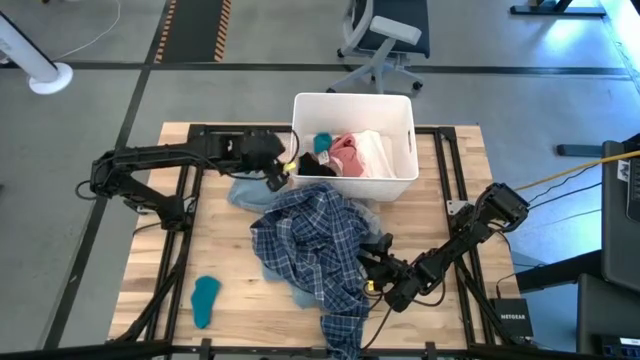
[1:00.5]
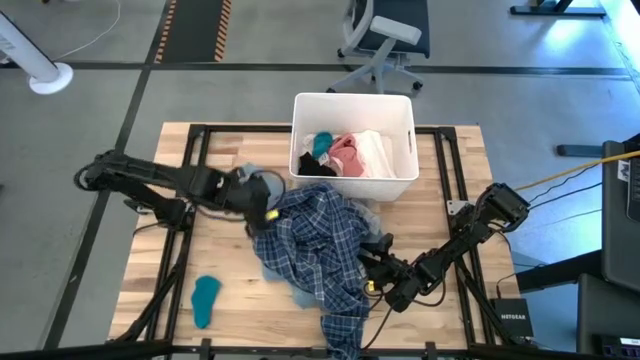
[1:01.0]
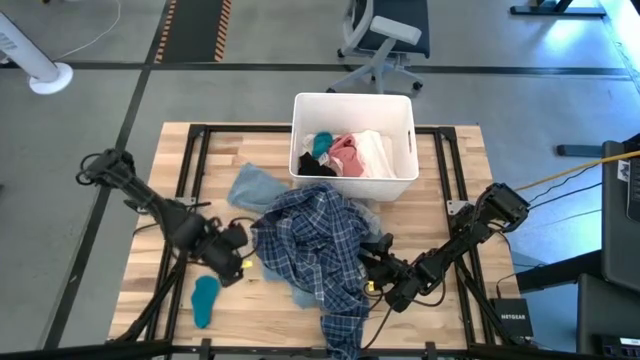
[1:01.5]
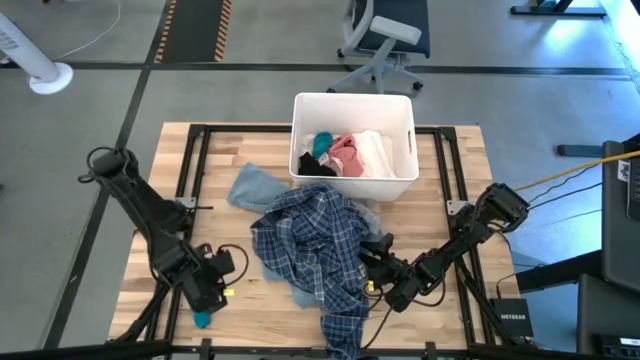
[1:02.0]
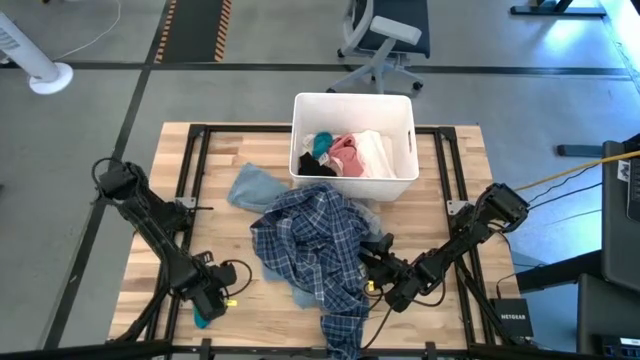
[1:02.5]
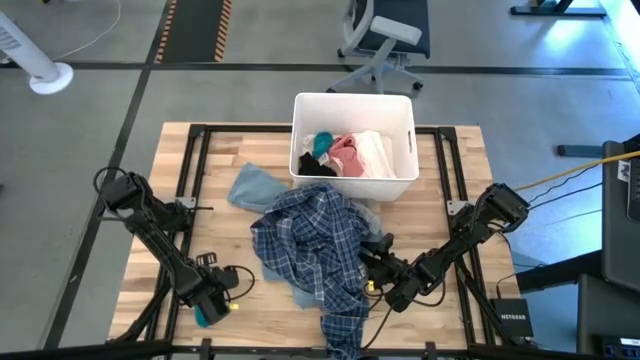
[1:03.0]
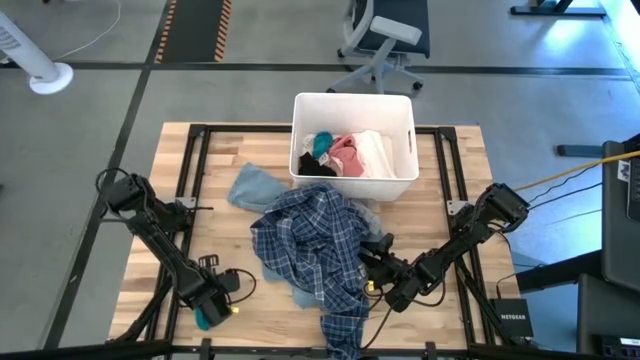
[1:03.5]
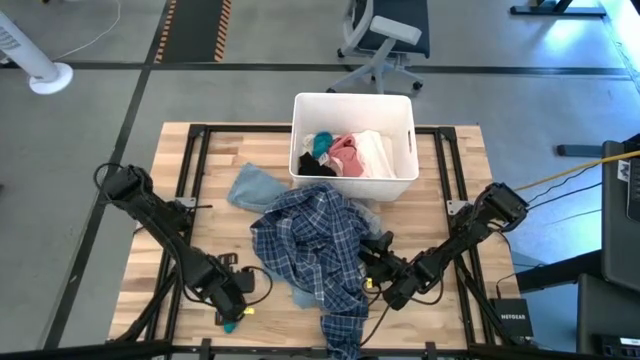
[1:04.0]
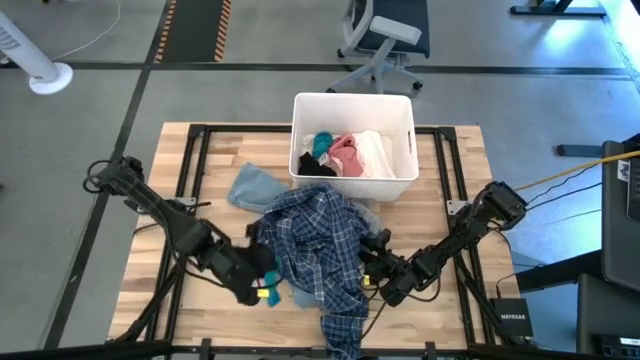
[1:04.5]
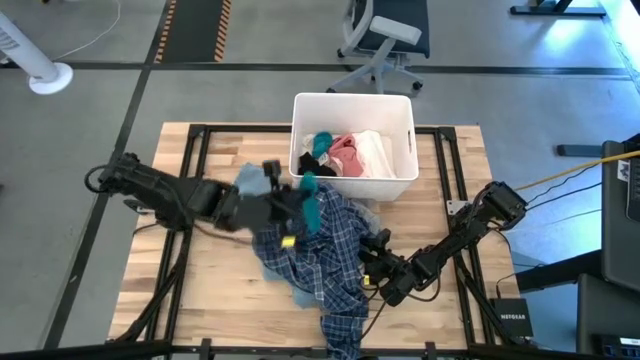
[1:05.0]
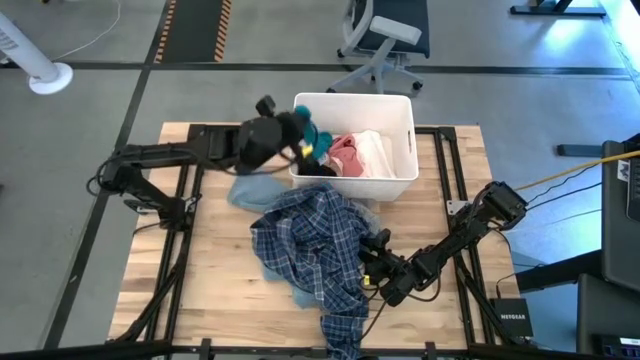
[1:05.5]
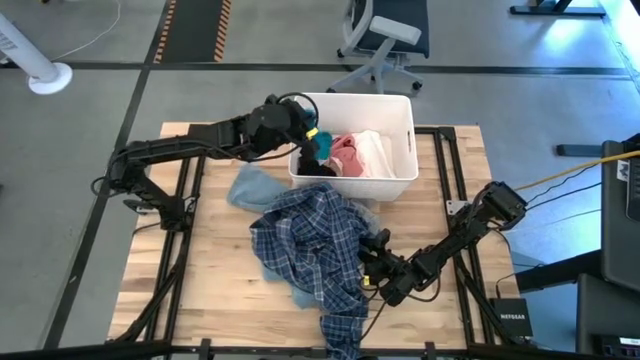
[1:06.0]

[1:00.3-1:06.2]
Task: Sort clothes
Put the blue sock into the white laundry bin

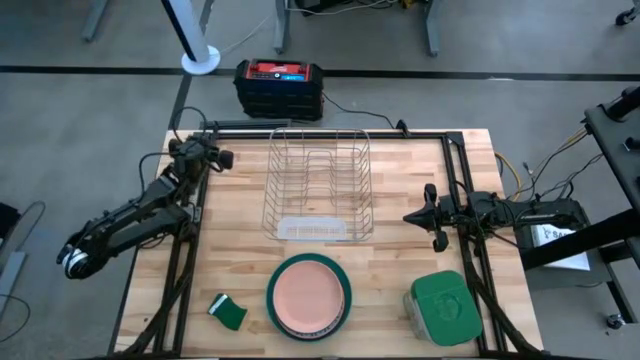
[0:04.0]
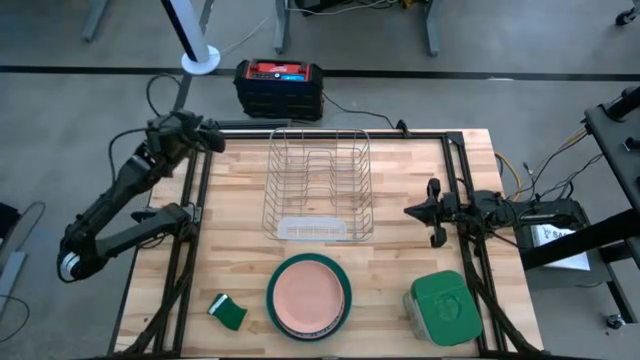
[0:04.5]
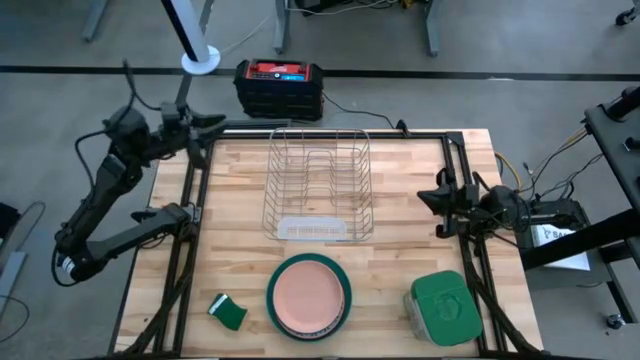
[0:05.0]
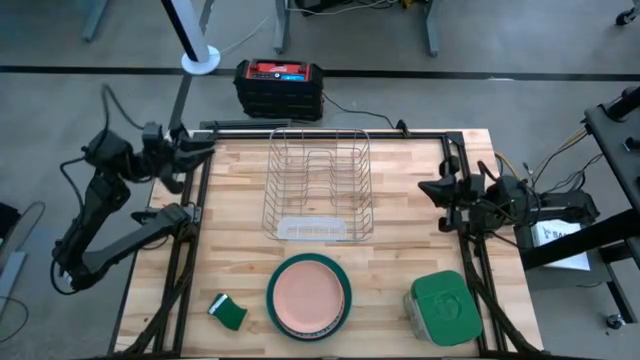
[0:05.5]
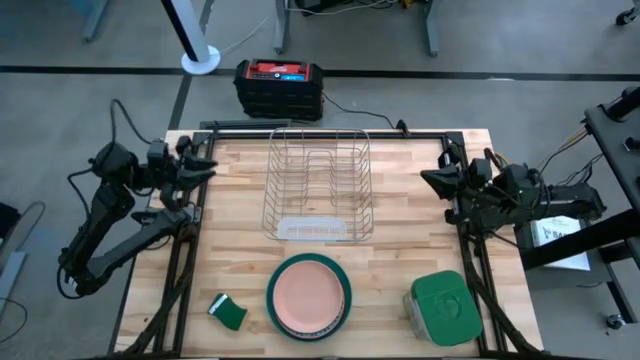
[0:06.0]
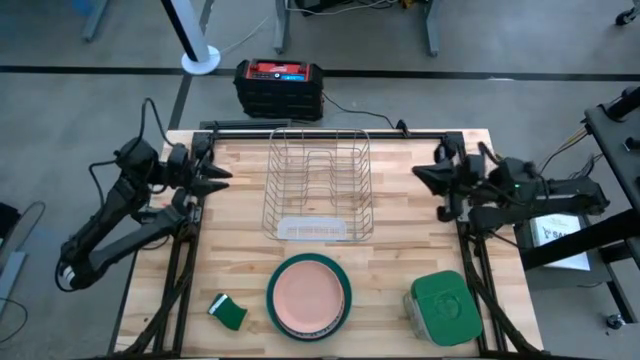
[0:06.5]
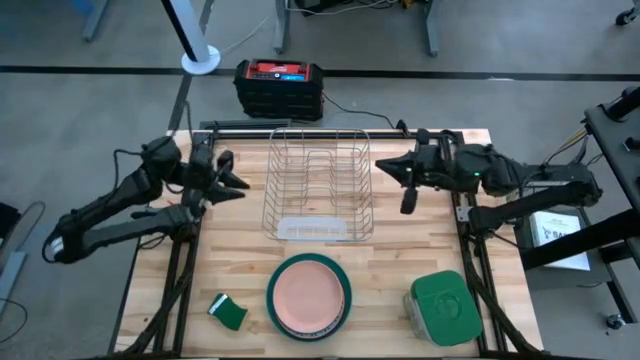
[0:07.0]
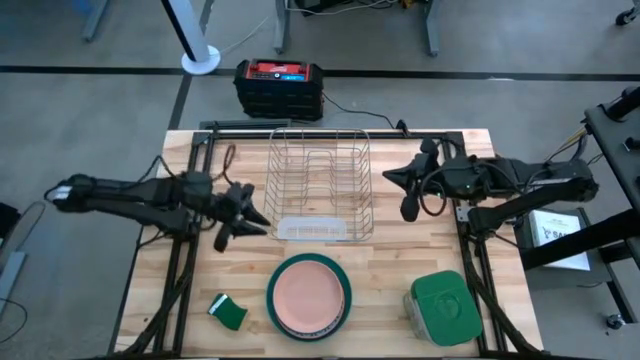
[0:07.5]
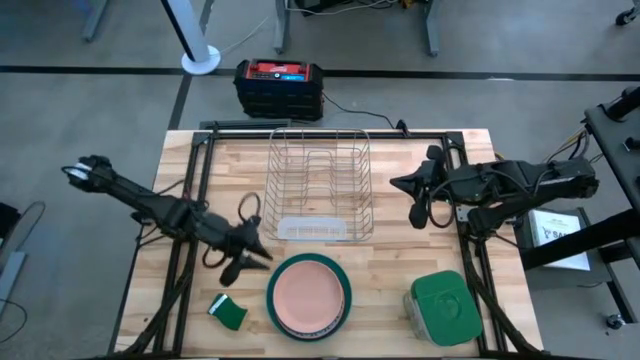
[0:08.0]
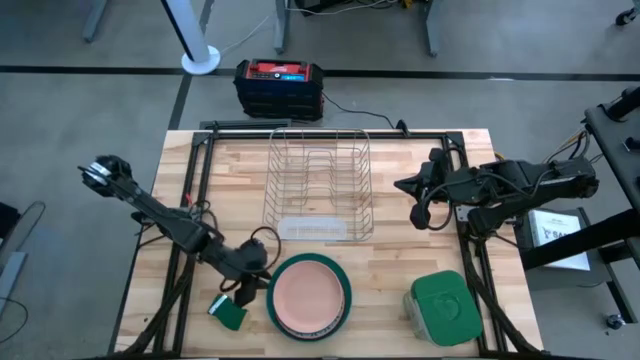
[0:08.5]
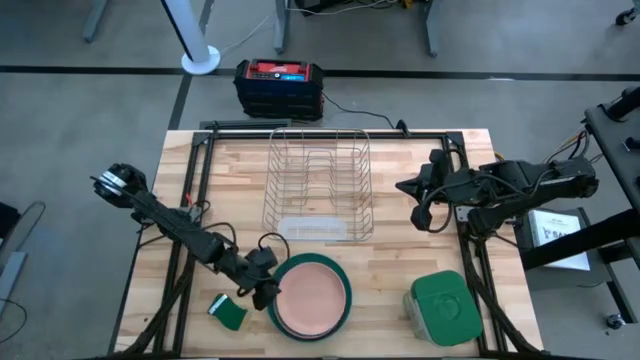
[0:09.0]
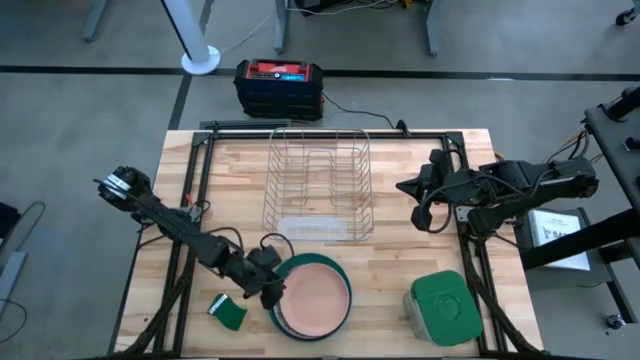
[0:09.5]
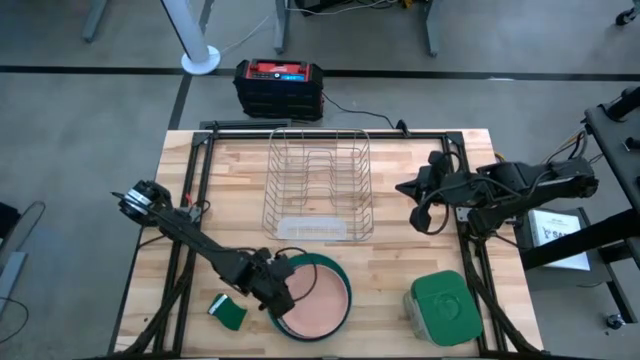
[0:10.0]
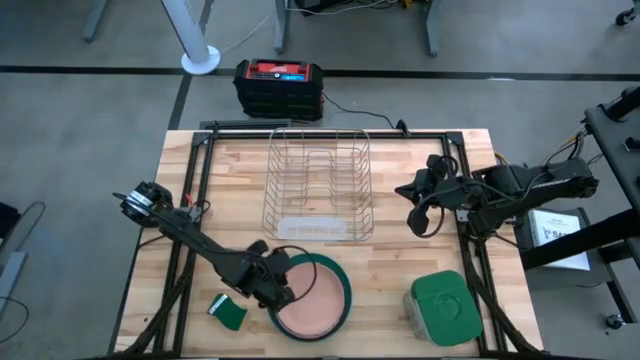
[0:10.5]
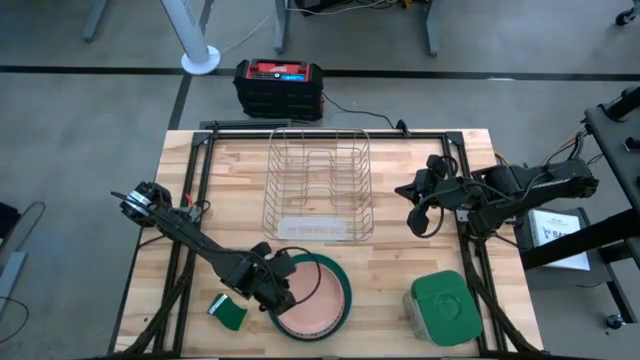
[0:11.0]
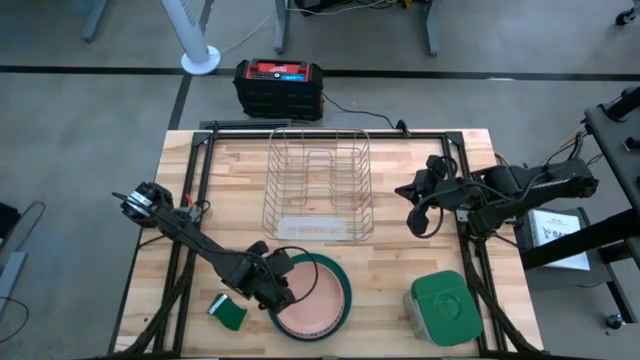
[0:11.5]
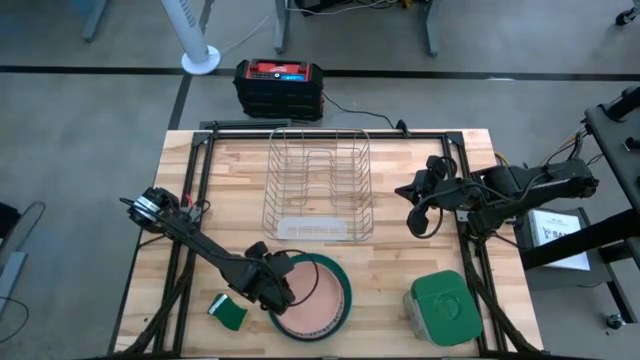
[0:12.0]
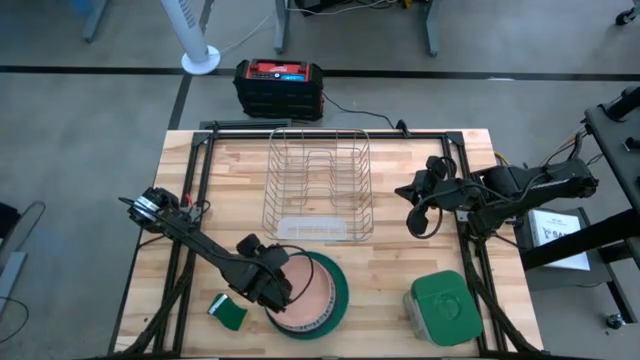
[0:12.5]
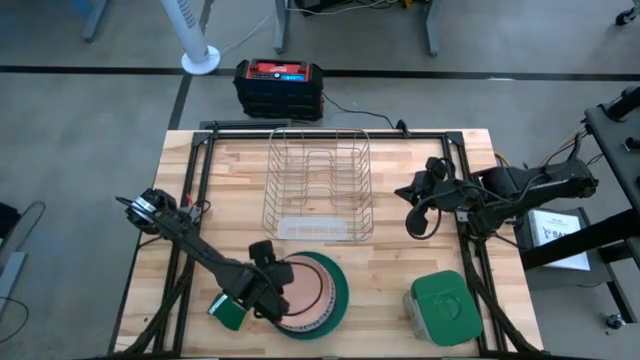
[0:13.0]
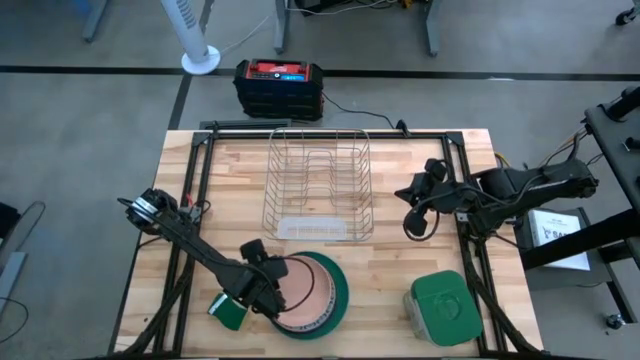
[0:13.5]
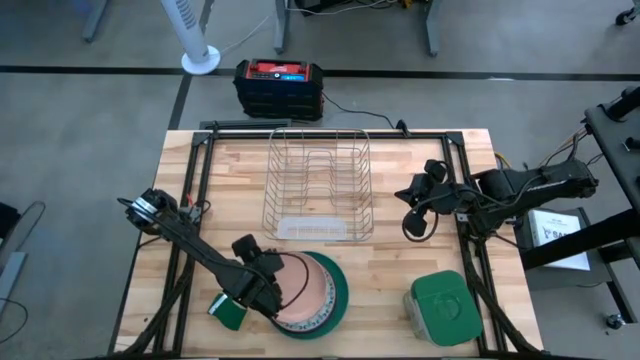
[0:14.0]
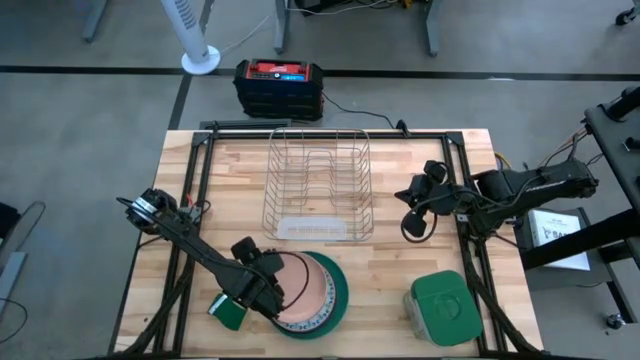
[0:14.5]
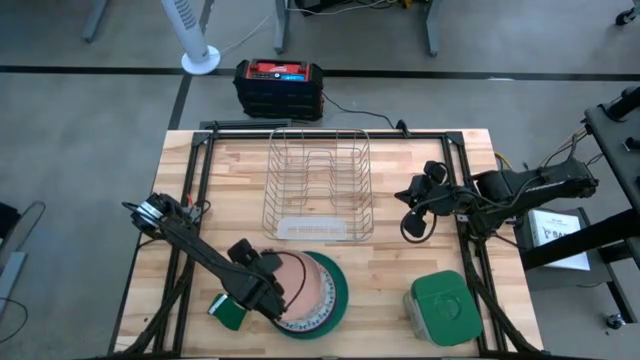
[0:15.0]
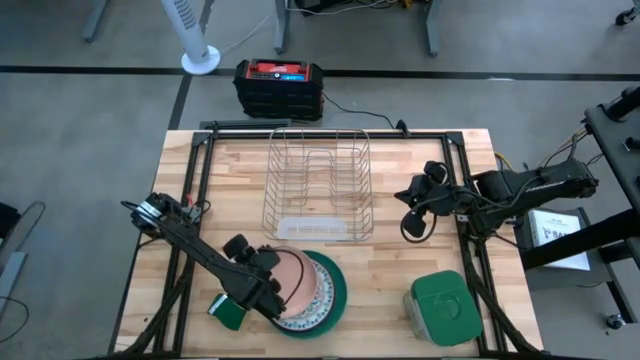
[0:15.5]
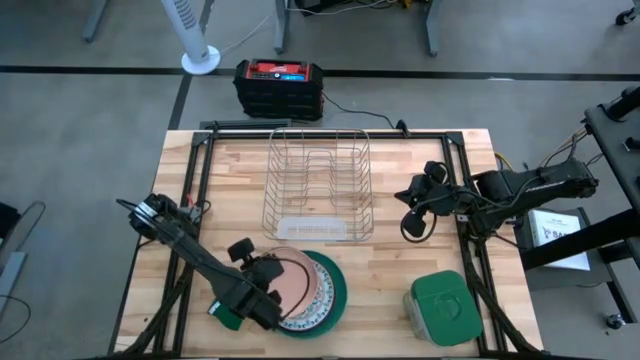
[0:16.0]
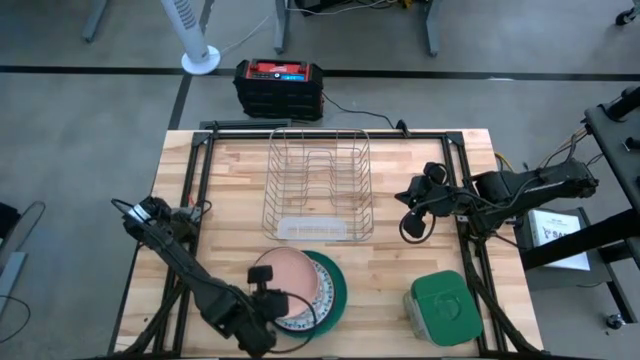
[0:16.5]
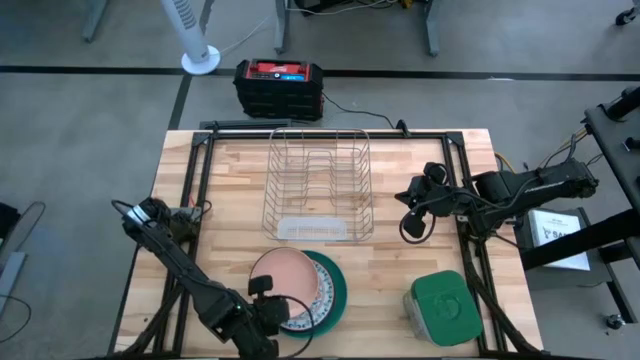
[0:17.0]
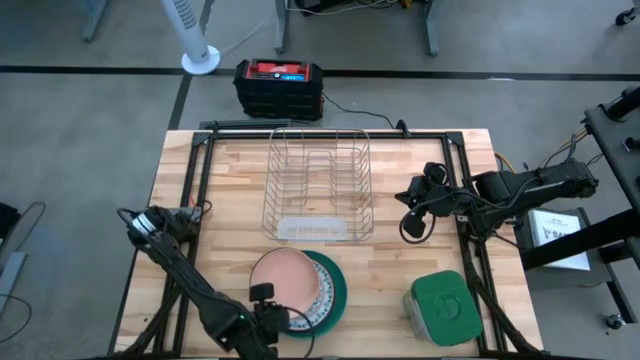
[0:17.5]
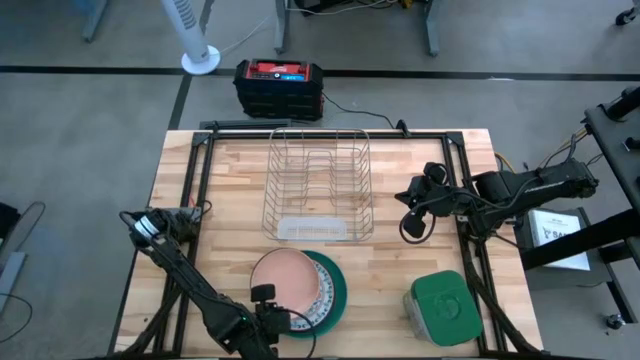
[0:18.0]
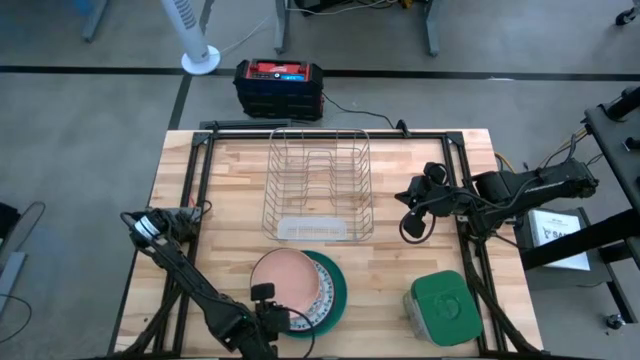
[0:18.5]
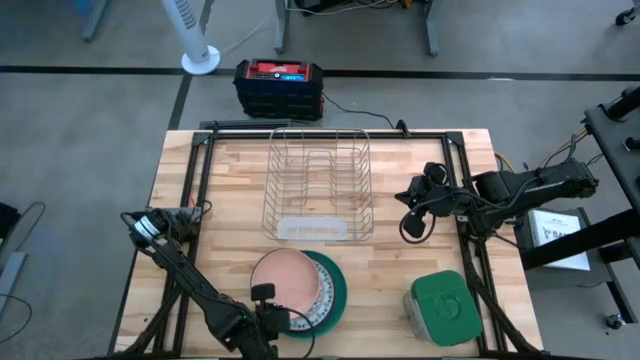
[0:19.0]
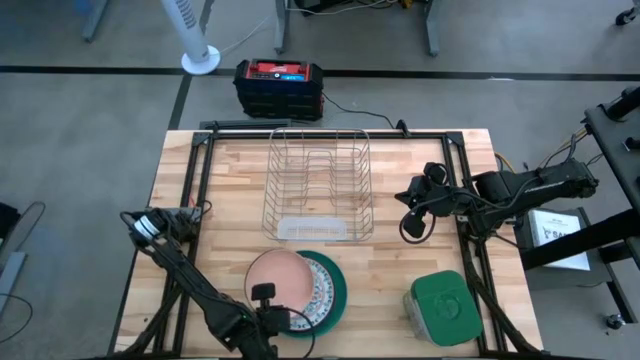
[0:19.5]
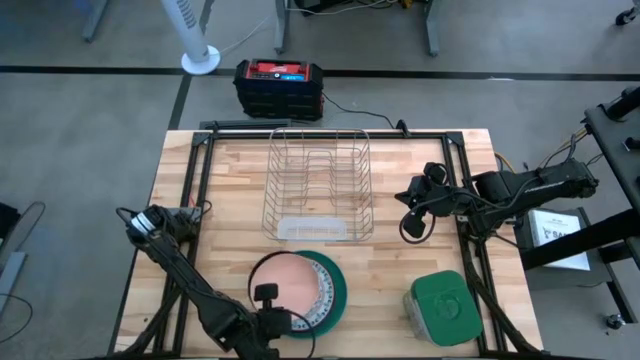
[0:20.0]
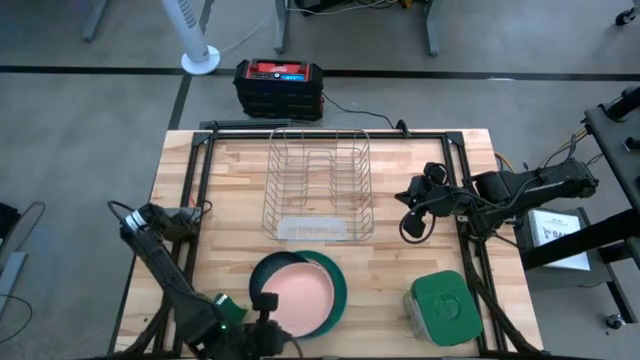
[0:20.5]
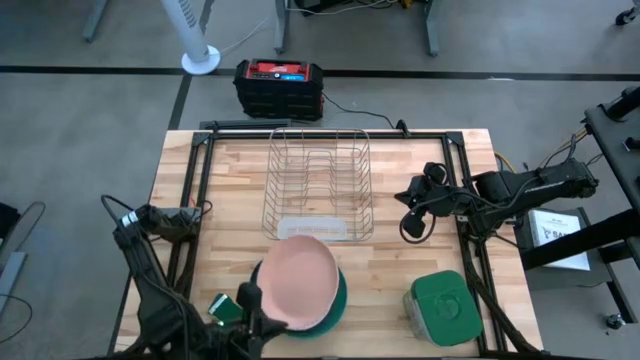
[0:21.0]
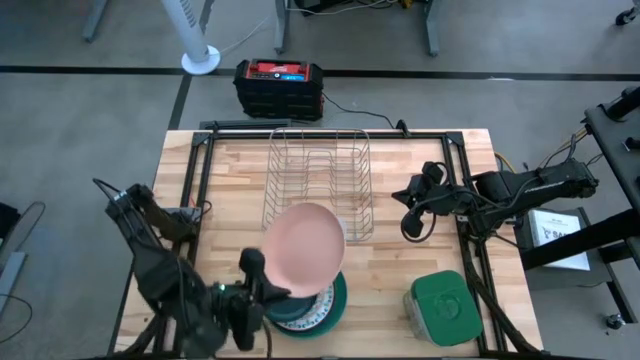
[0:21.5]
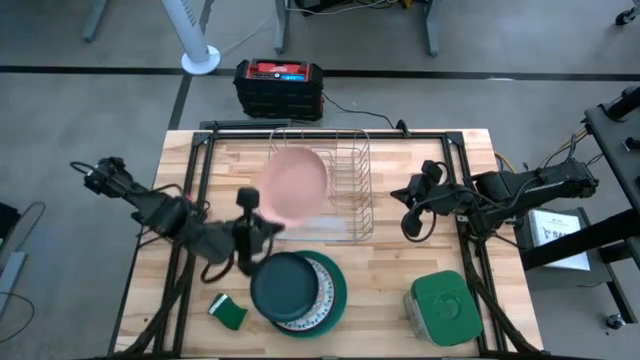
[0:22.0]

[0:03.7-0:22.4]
Task: Sort dishes
Put the pink plate in the dishwasher rack
